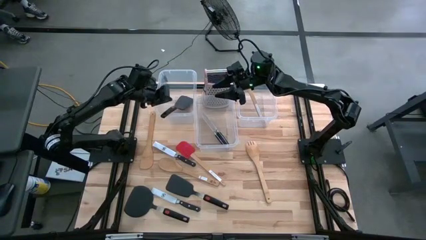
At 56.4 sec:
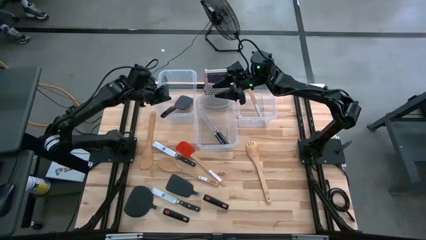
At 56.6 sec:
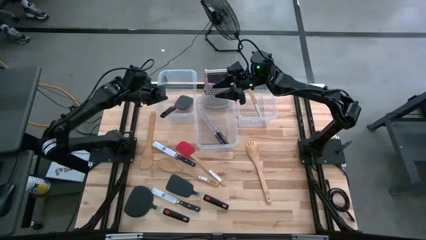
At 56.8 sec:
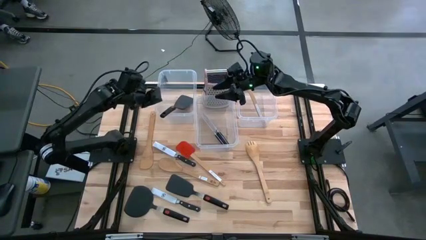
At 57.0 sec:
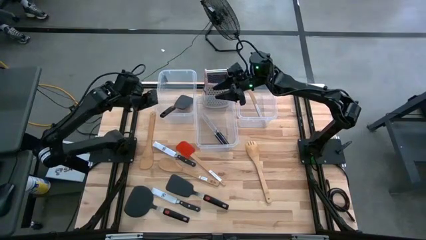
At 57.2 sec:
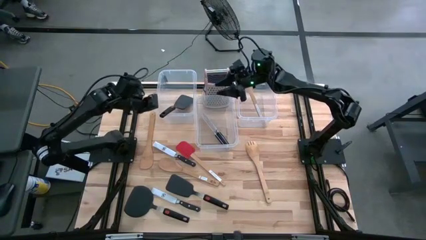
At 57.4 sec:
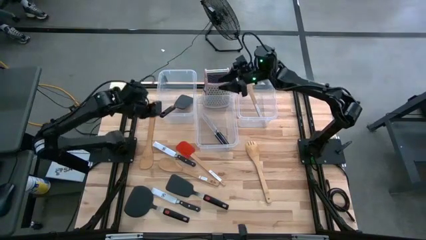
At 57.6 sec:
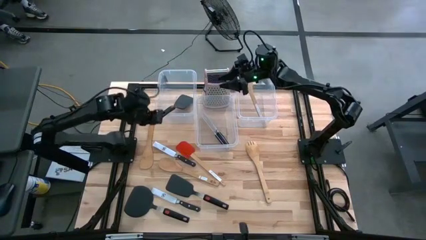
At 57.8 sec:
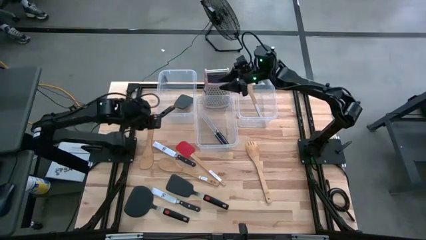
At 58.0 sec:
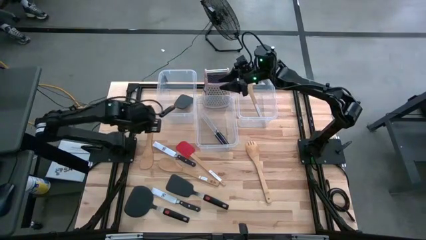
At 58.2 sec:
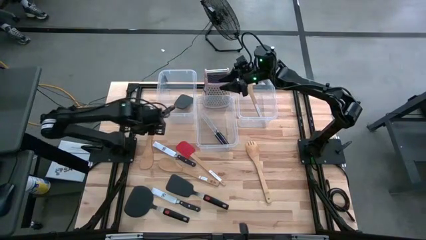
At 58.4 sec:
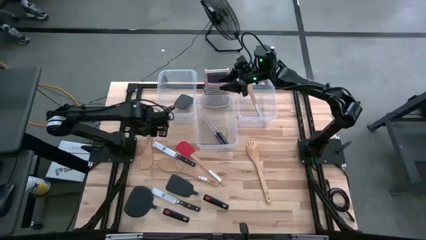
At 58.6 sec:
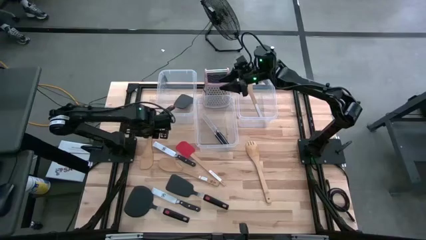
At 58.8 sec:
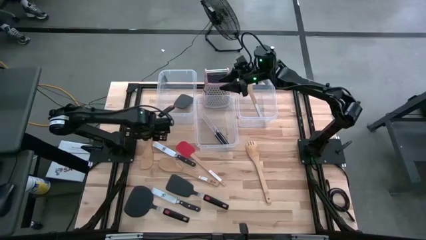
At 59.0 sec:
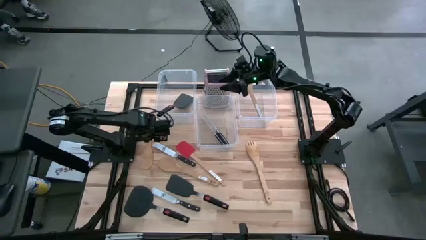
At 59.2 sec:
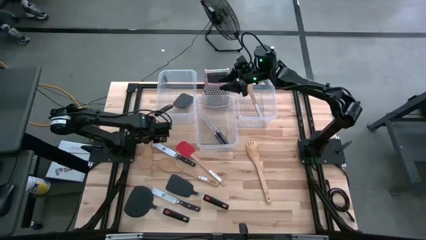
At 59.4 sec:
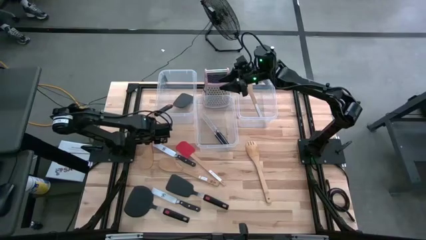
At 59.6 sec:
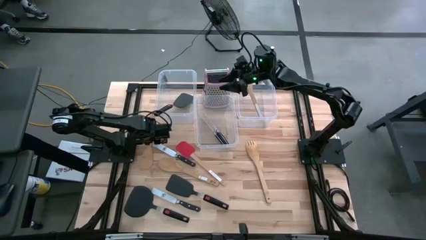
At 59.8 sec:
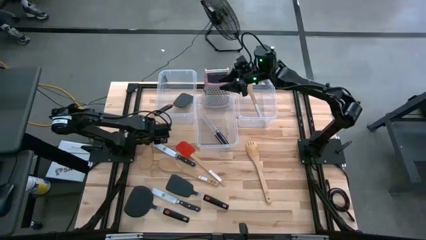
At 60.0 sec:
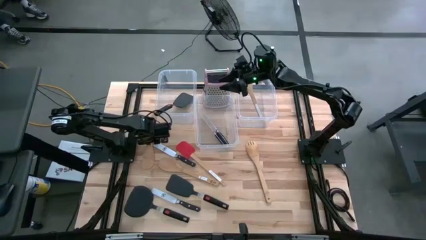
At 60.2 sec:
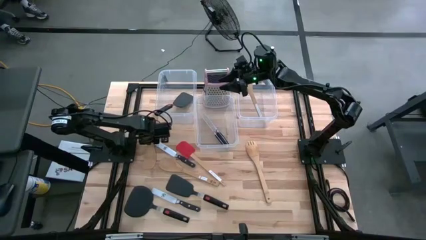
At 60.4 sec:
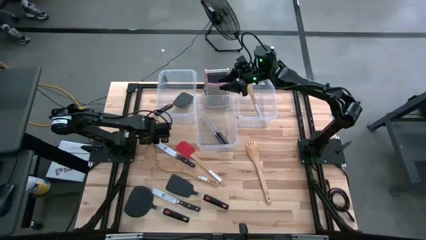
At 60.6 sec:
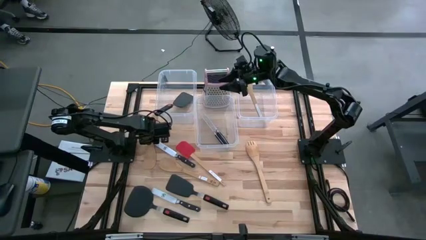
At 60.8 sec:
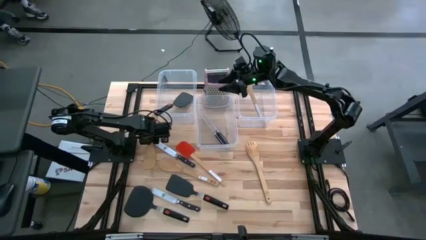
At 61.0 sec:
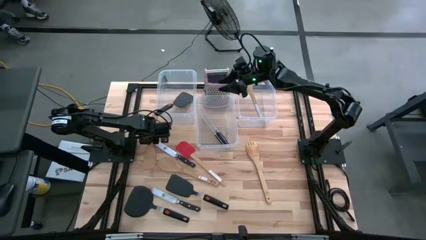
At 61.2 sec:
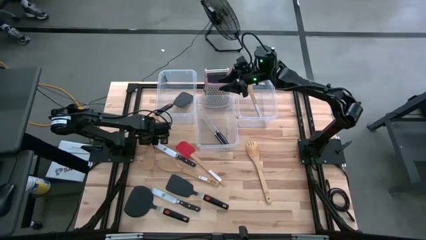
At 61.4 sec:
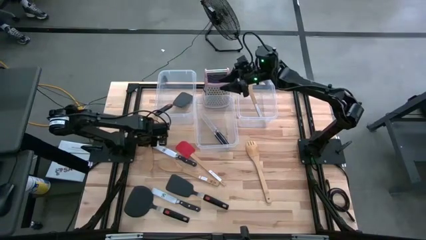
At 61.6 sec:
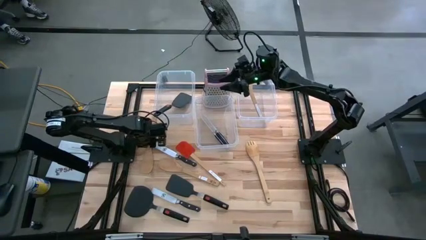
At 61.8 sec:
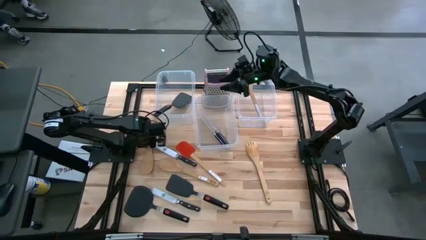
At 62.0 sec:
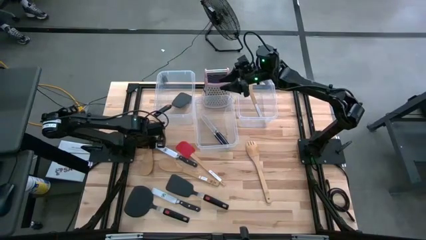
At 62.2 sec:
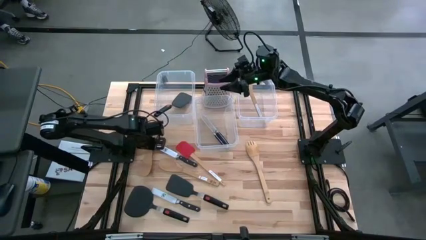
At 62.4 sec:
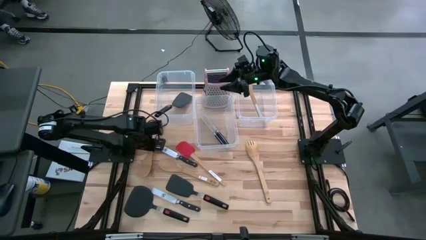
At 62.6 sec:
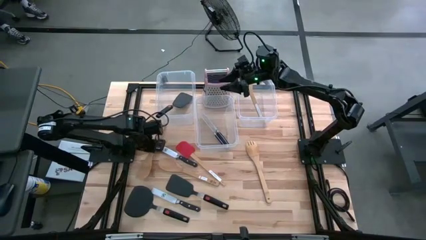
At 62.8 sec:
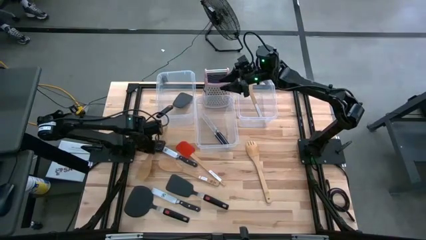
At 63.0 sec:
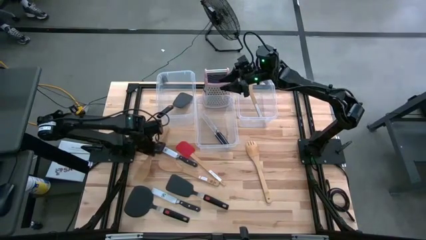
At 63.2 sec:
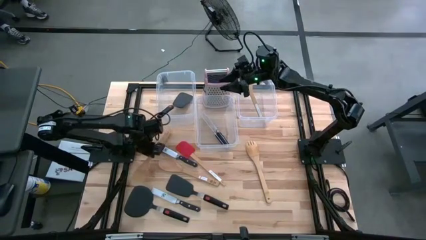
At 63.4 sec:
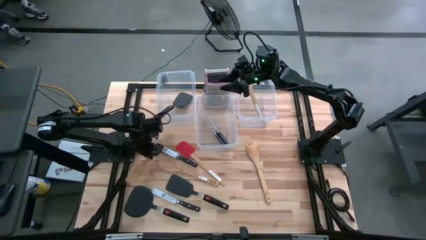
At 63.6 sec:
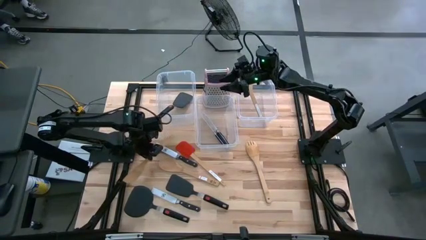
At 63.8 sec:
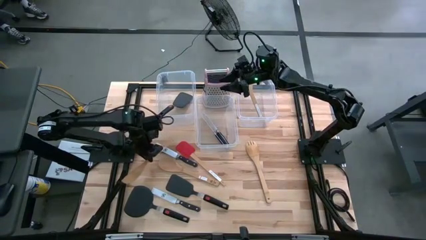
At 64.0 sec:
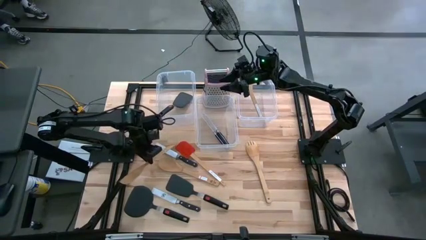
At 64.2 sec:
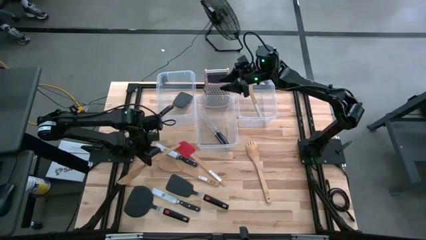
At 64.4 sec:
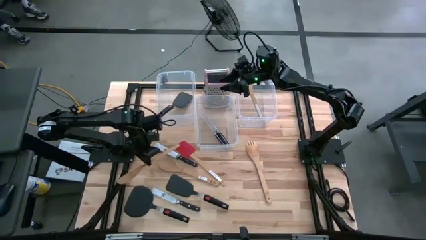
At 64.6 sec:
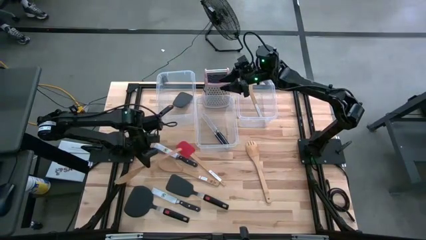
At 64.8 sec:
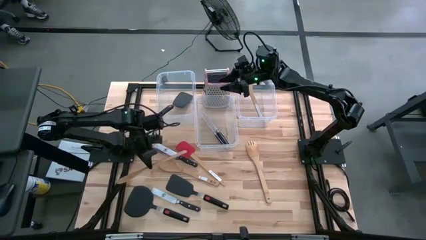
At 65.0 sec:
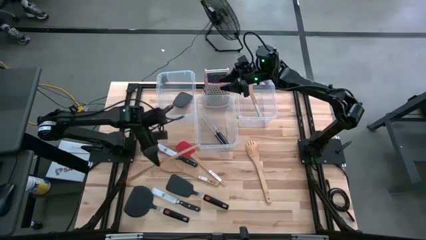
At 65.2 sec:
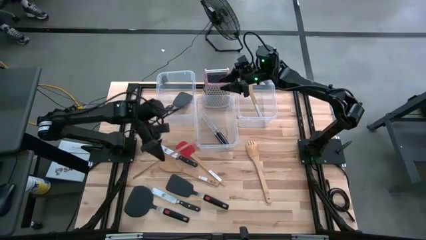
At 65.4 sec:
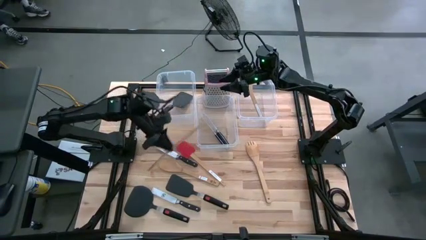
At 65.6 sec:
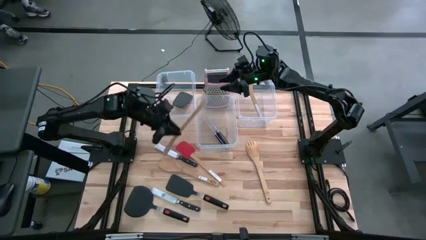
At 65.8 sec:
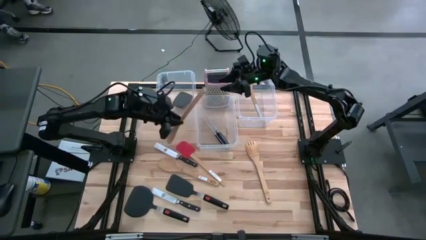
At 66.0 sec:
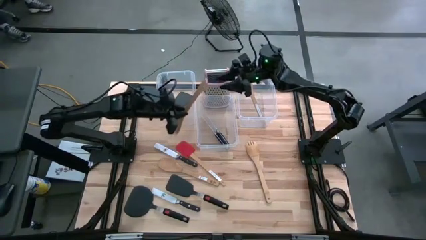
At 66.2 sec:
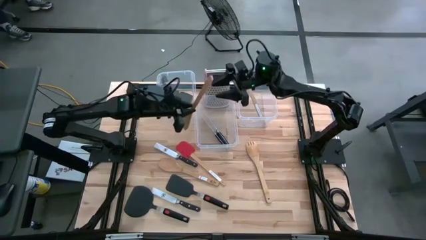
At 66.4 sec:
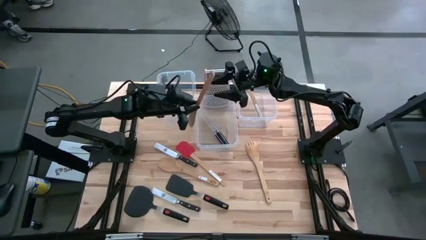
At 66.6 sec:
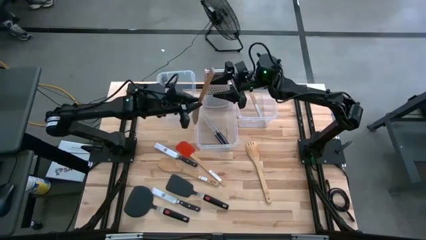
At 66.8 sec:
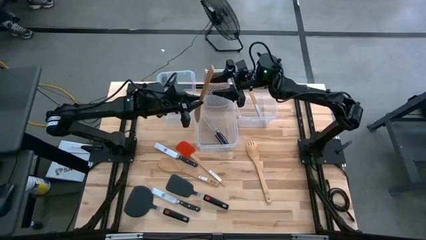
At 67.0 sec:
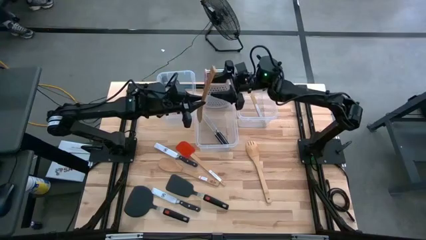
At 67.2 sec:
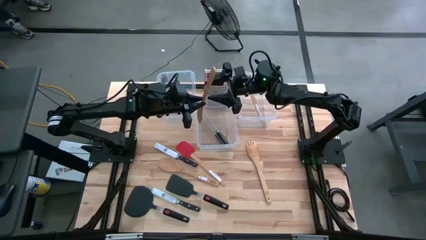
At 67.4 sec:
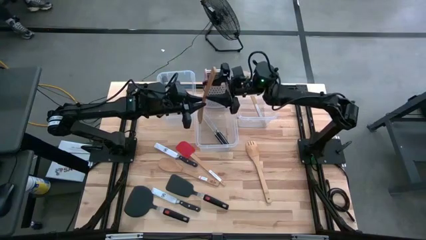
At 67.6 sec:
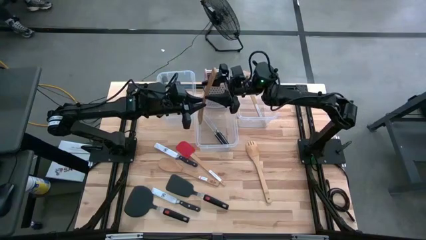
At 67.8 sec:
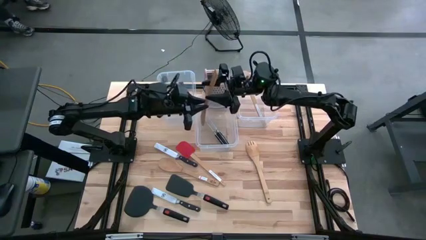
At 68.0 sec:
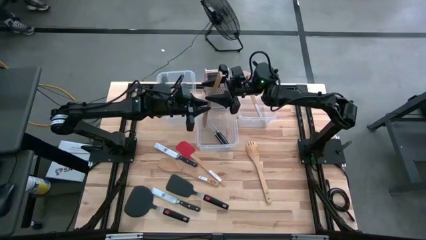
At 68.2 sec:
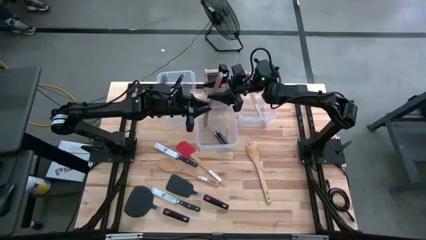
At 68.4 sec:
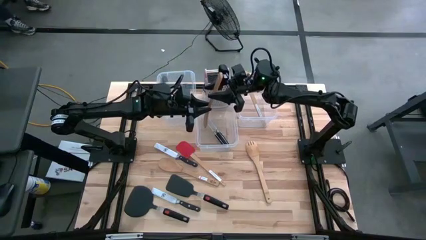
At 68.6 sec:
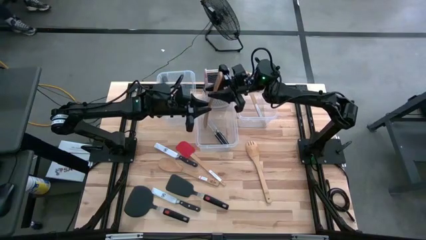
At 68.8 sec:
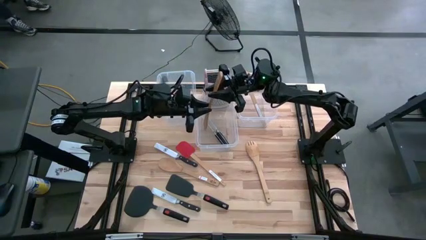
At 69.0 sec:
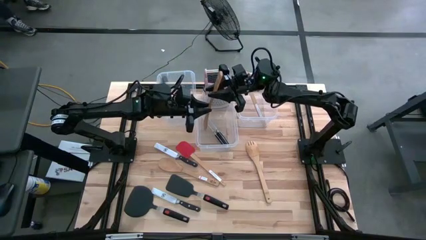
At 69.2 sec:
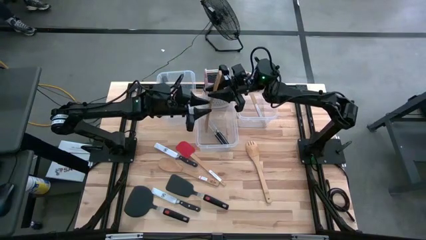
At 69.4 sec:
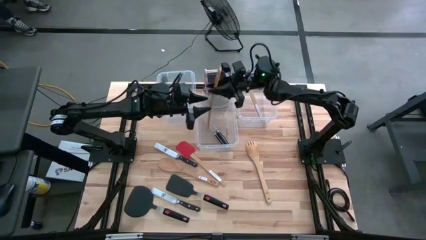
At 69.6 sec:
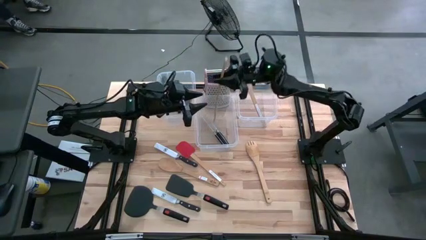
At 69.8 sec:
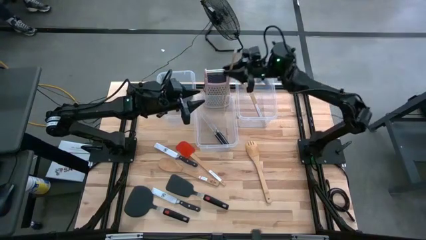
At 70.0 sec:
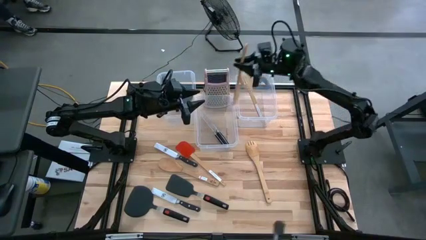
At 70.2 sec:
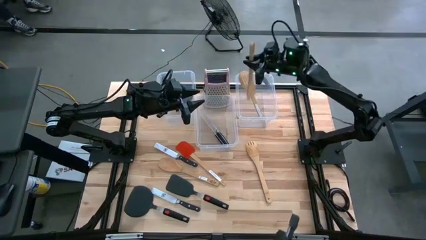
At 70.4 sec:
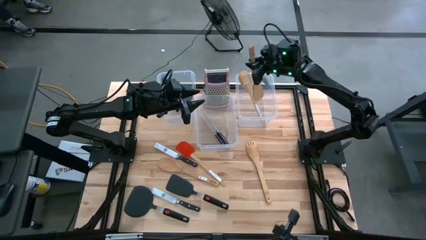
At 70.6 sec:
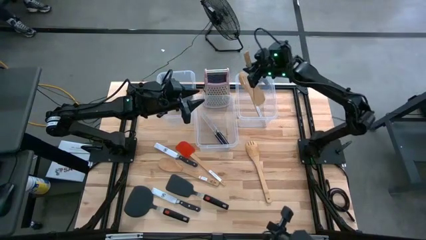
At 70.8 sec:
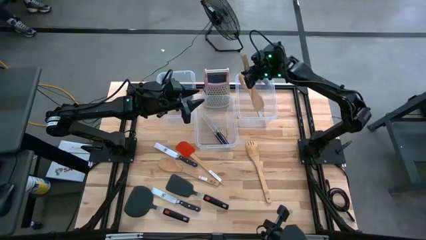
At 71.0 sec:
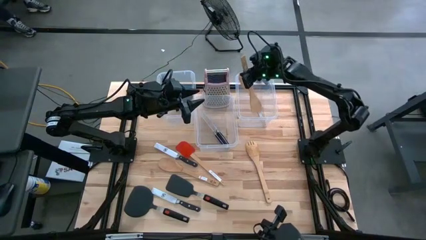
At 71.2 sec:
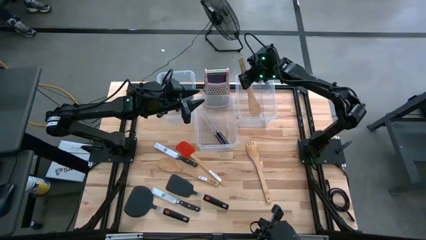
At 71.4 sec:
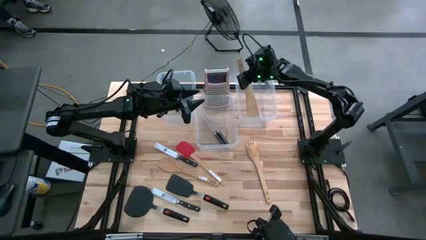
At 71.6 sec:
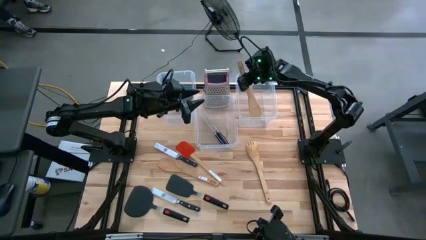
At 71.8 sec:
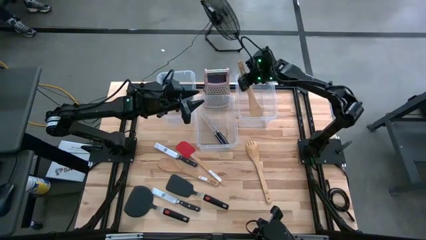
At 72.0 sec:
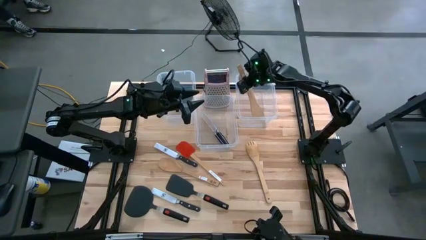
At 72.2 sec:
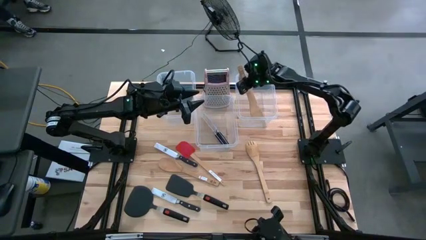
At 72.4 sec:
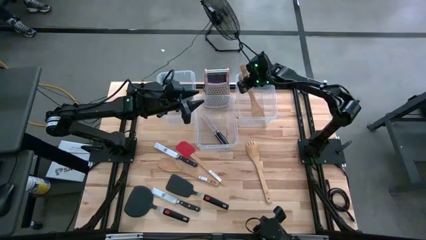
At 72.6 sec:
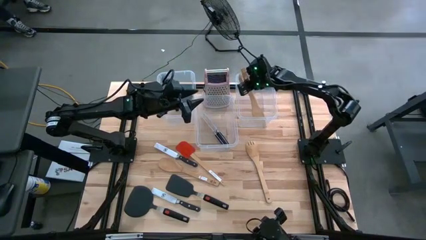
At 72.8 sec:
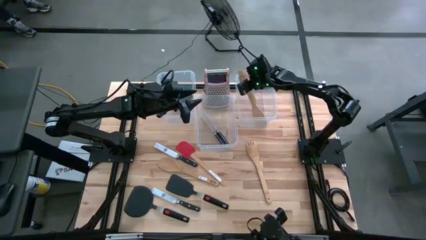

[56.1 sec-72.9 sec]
Task: Pick & Place Kitchen Items
Put the brown spatula into the right transparent bin
